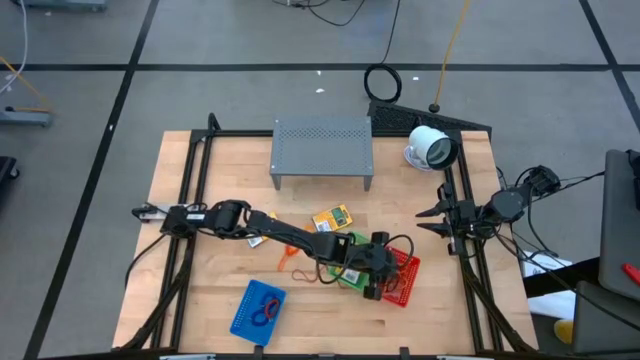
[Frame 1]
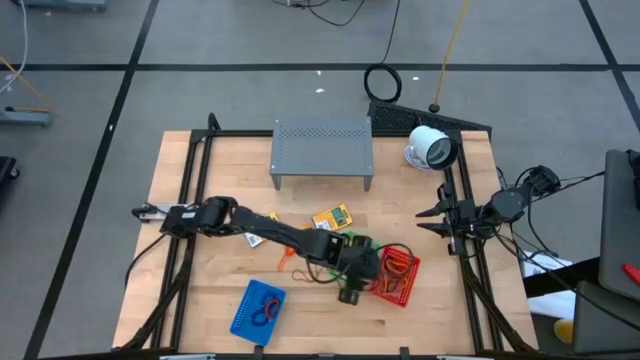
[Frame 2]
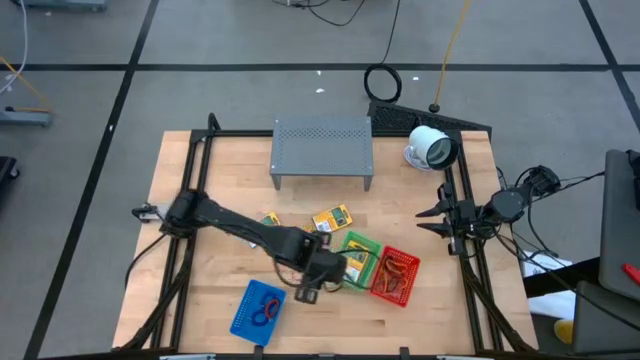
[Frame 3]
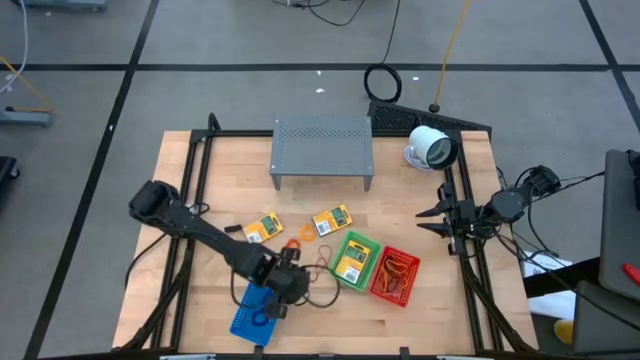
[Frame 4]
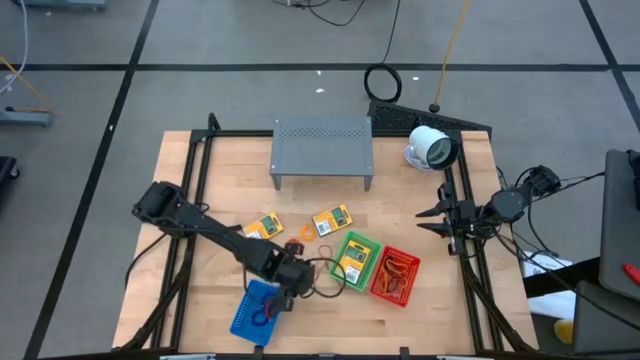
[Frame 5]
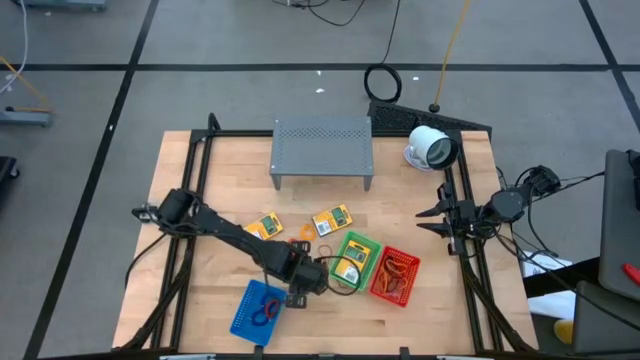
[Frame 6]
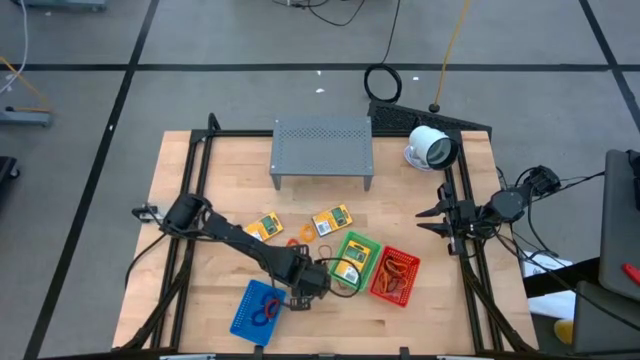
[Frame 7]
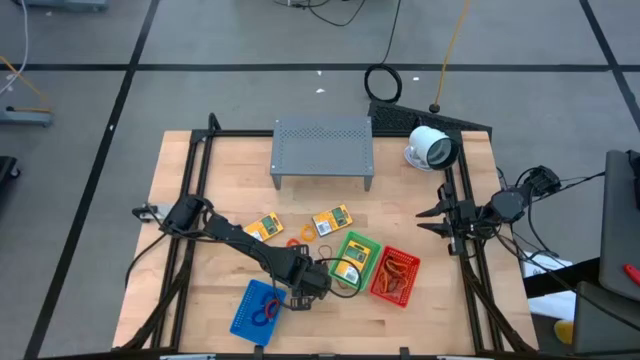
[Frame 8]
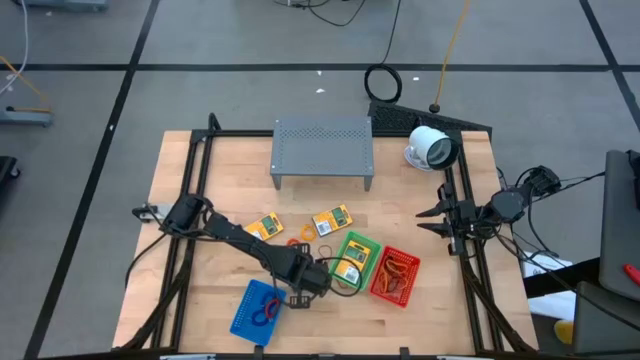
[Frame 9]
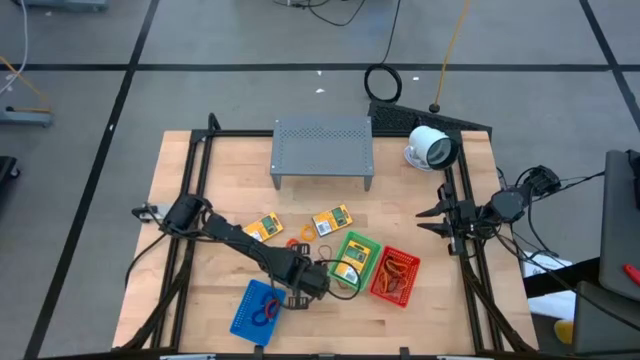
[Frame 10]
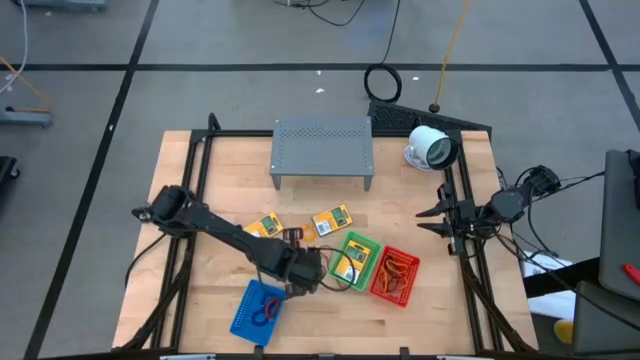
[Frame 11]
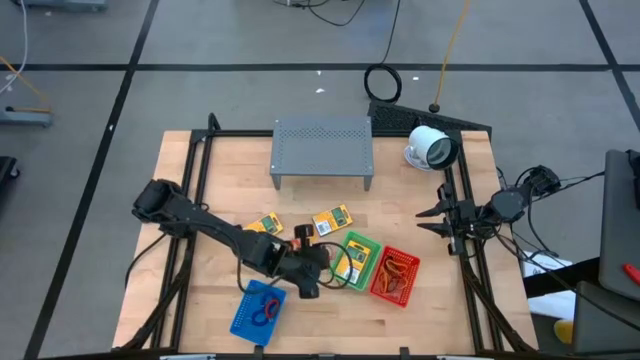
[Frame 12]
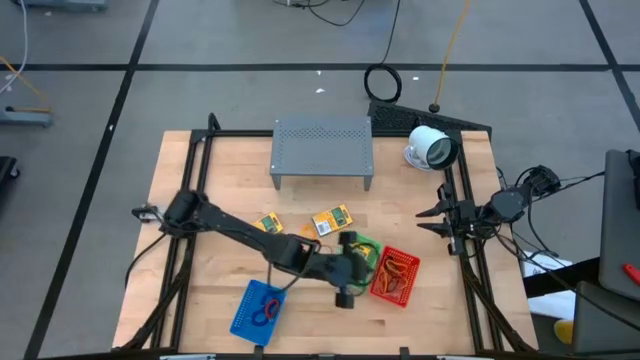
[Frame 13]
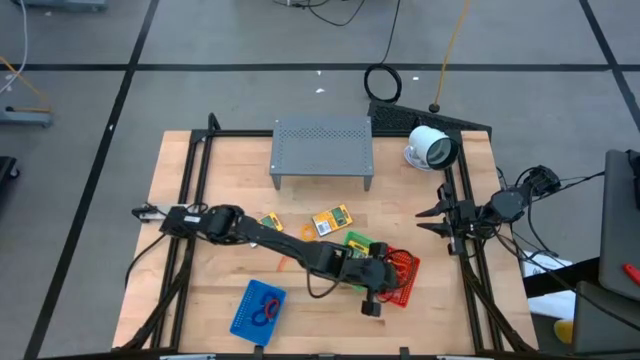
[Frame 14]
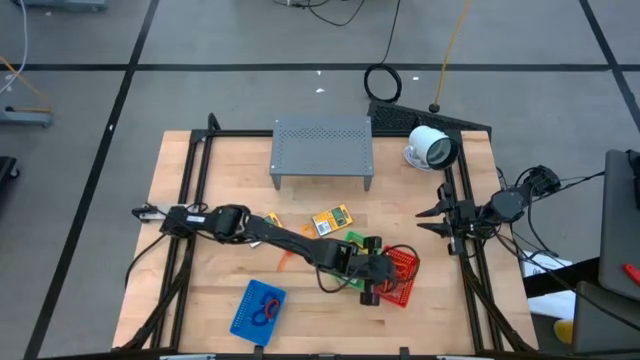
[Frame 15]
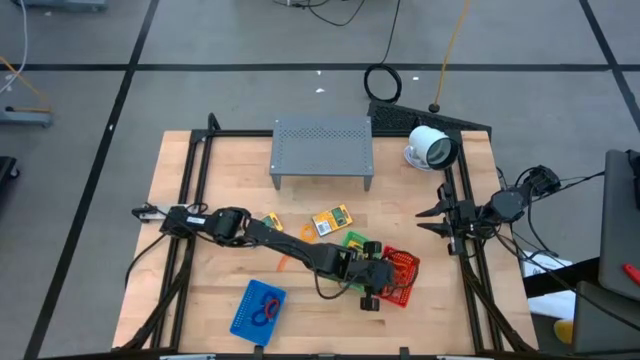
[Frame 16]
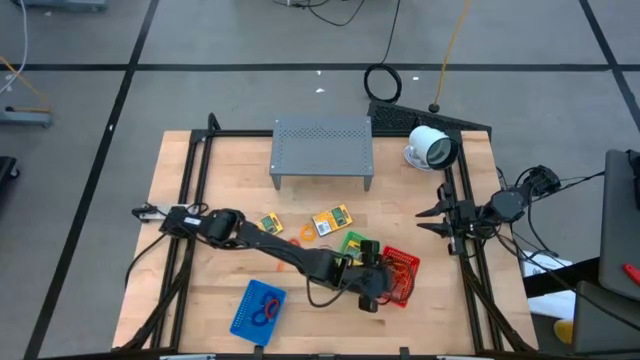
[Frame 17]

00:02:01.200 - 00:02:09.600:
Task: Pick & Place Office Desk Supplies
Put the red rubber band into the red bin

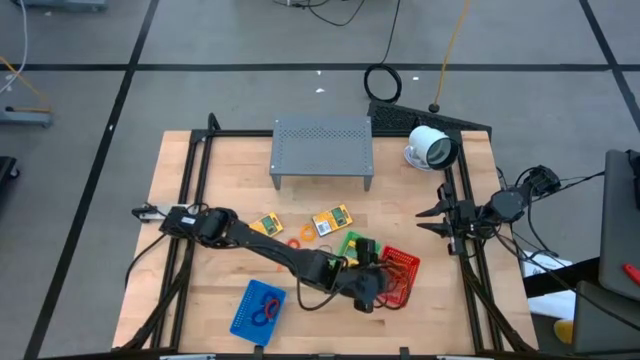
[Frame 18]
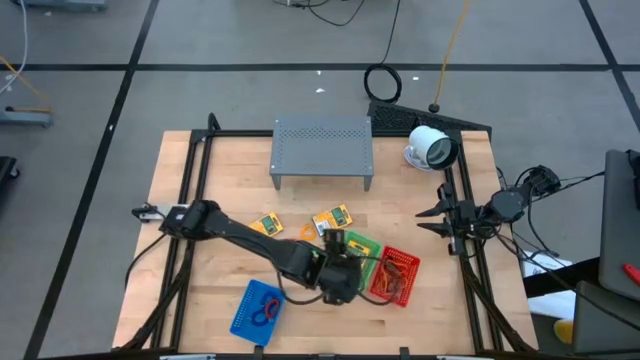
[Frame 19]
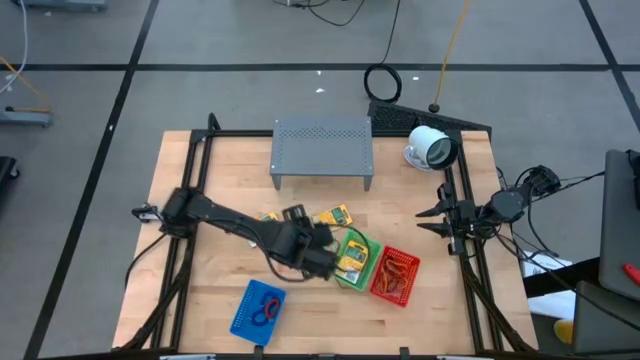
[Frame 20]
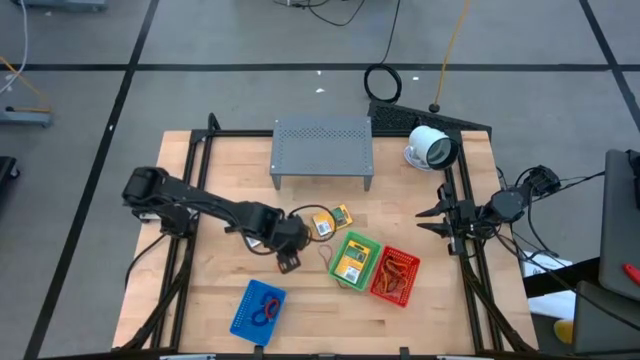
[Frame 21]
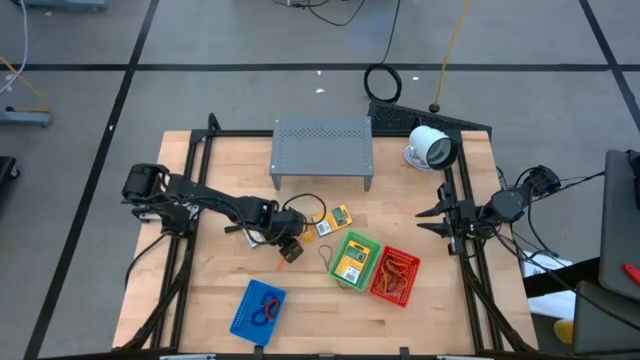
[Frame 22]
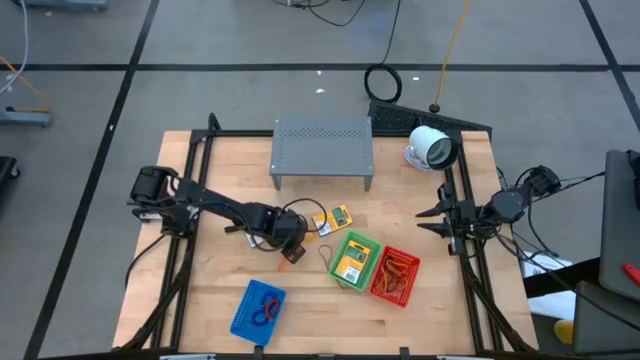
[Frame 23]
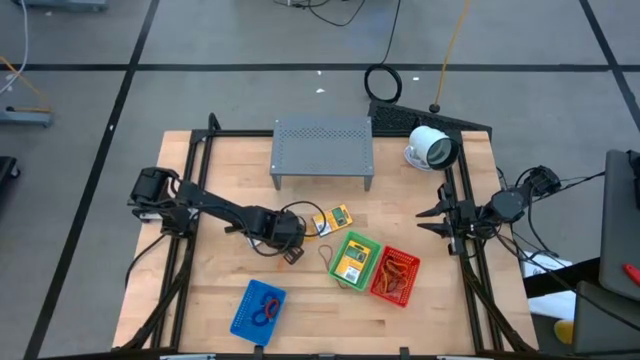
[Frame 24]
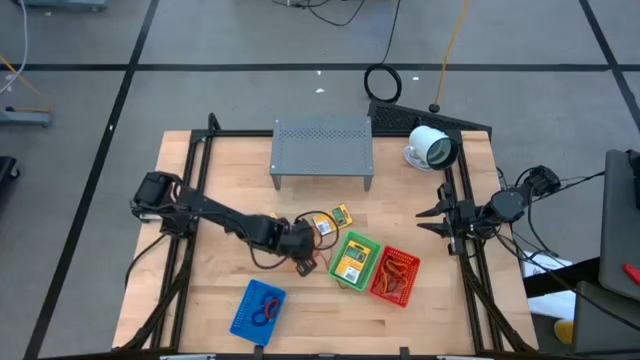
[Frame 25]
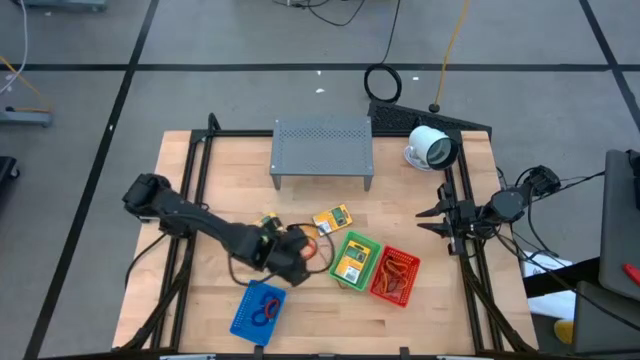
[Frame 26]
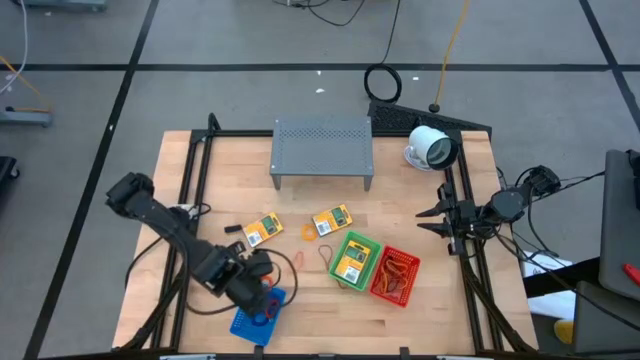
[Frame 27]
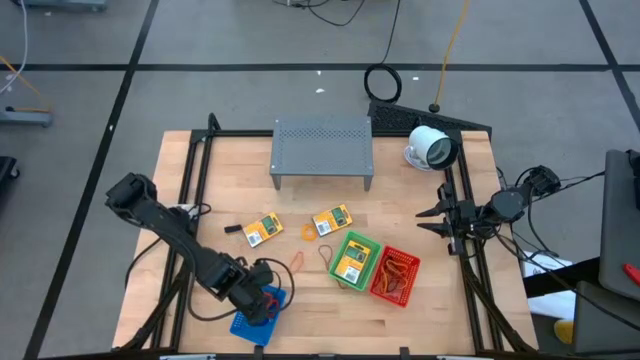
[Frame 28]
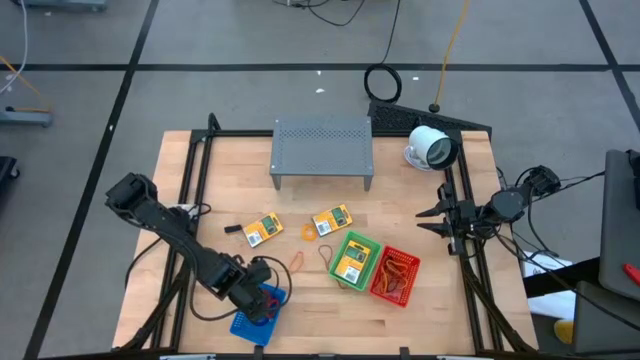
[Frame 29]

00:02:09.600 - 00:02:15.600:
Put the orange spring rubberband band into the blue bin

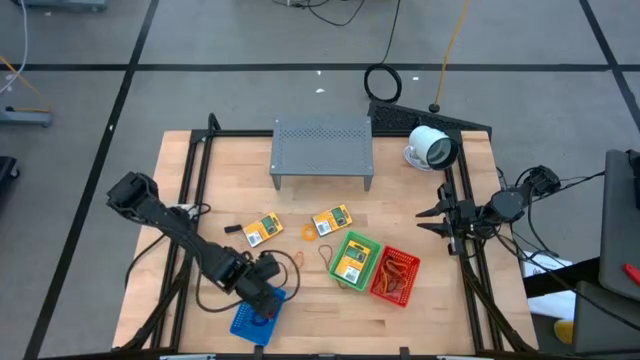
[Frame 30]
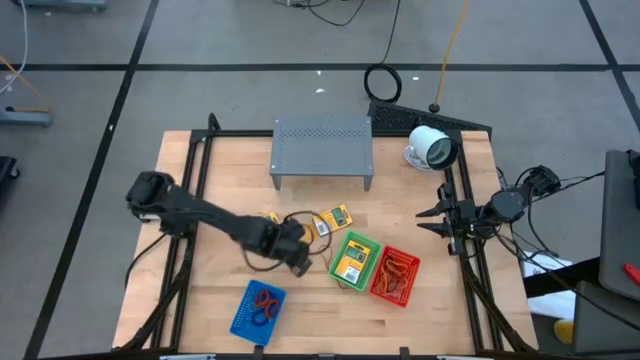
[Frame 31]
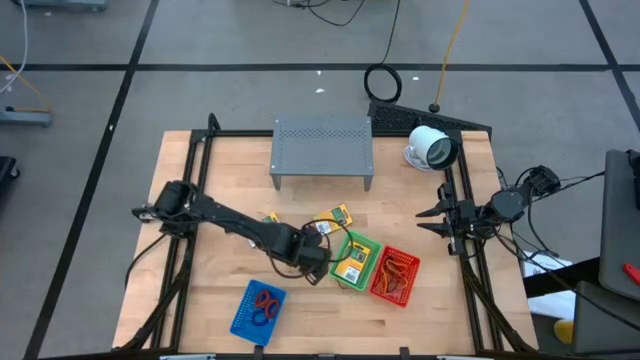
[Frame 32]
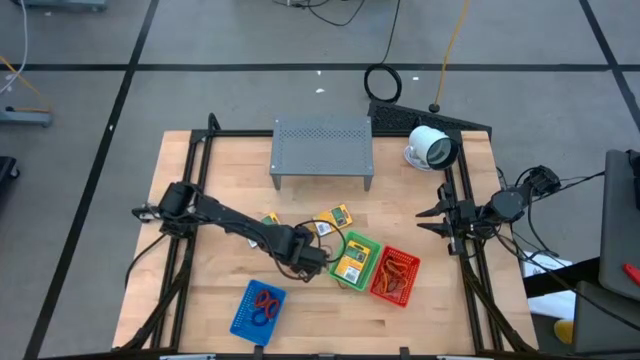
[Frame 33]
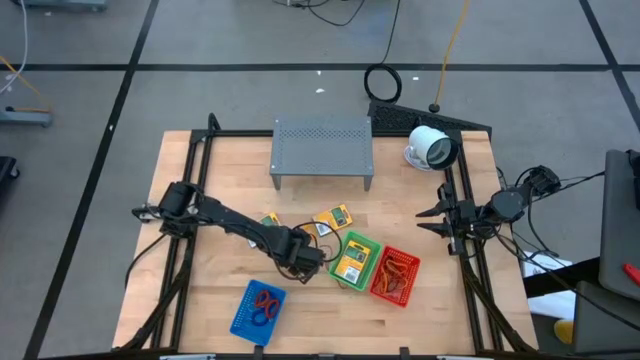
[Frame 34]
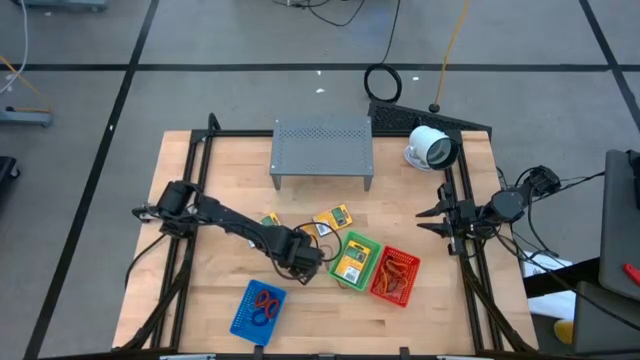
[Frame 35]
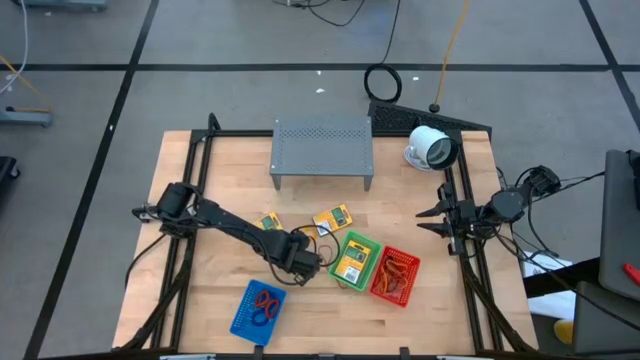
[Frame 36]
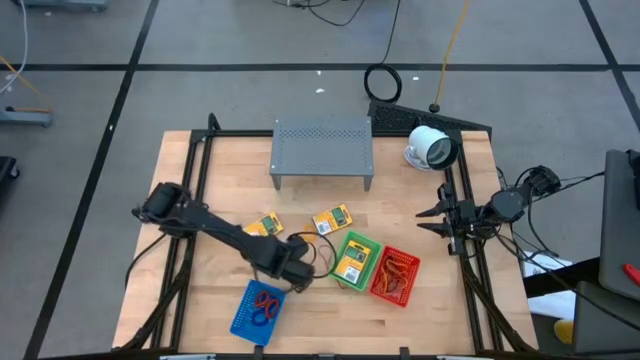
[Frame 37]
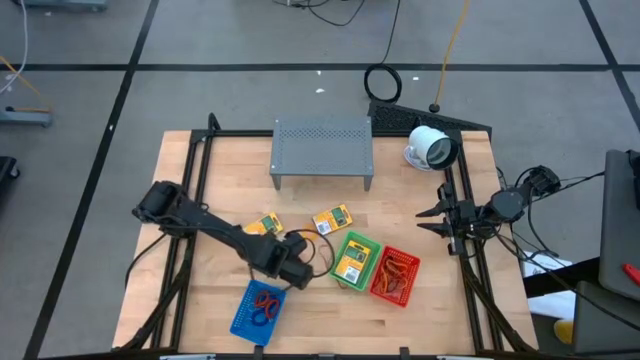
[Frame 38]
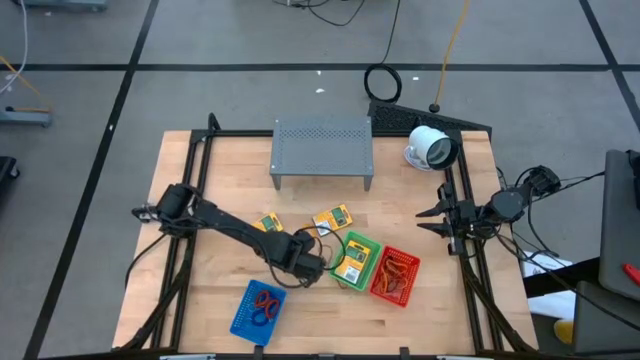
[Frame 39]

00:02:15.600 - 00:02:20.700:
Put the orange rubber band into the red bin
